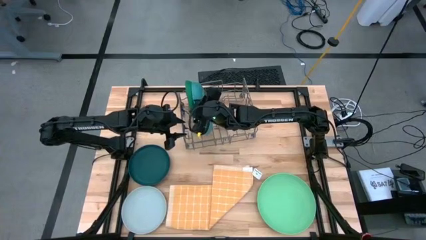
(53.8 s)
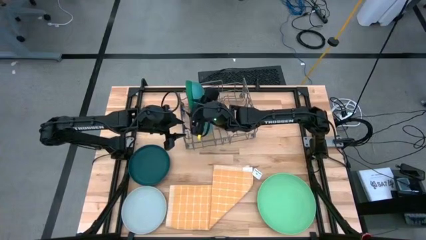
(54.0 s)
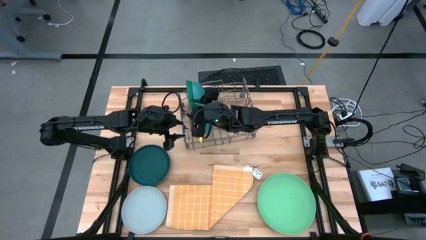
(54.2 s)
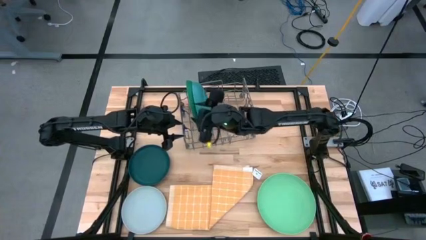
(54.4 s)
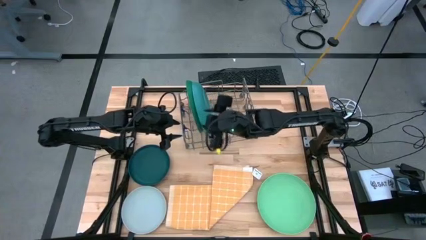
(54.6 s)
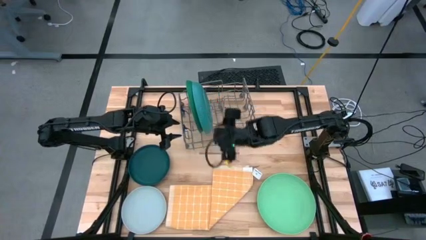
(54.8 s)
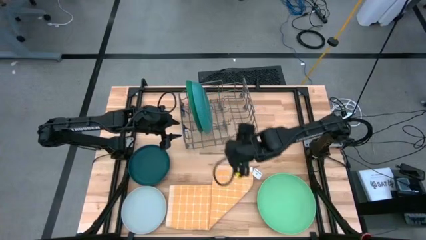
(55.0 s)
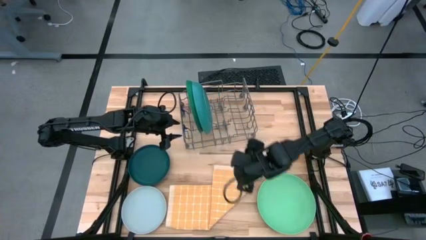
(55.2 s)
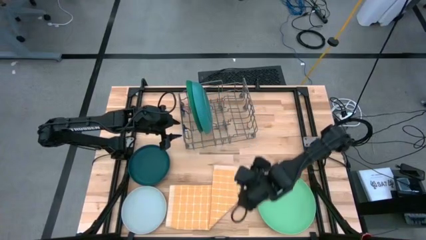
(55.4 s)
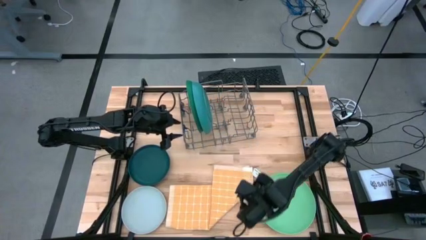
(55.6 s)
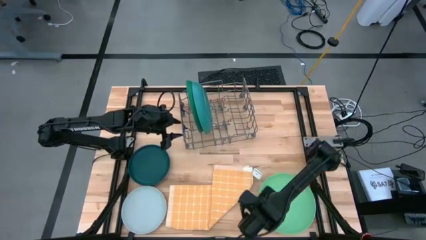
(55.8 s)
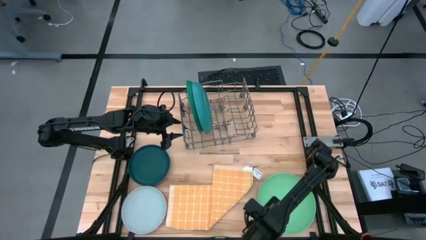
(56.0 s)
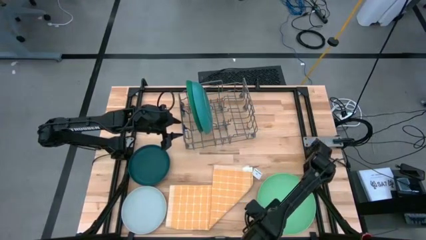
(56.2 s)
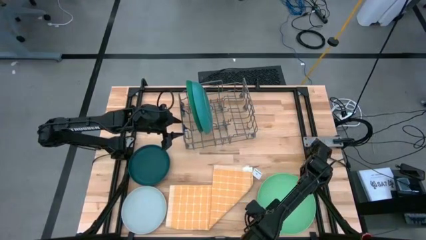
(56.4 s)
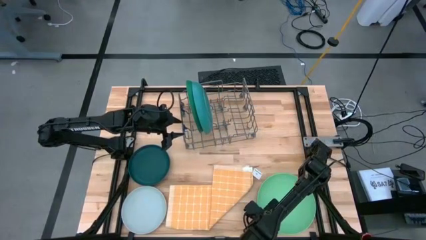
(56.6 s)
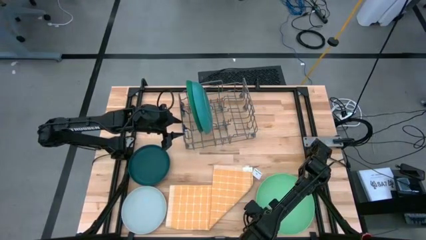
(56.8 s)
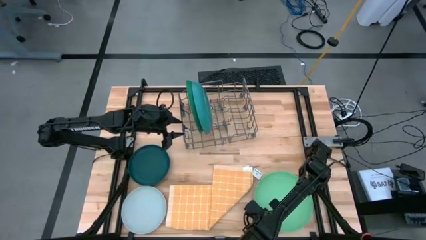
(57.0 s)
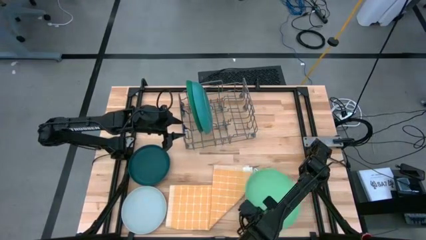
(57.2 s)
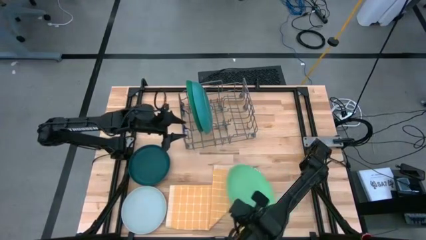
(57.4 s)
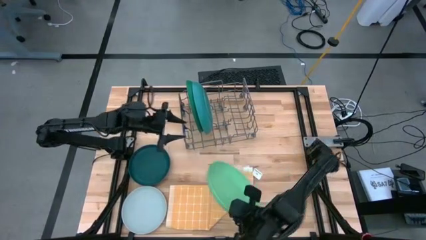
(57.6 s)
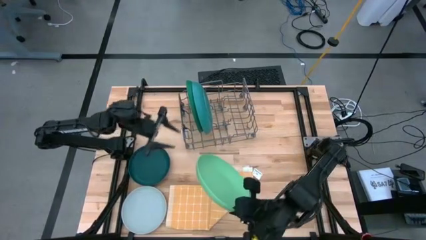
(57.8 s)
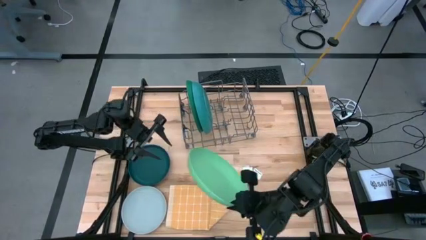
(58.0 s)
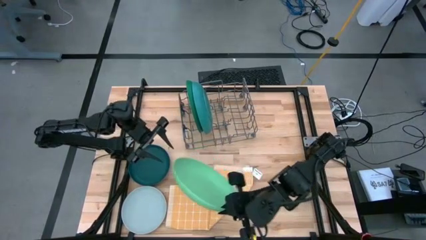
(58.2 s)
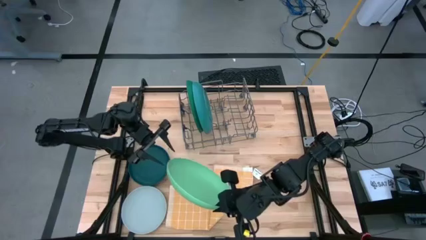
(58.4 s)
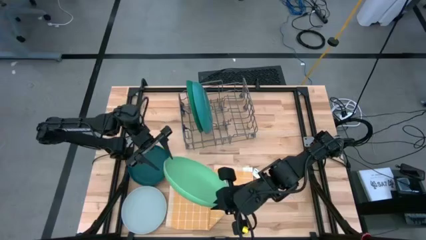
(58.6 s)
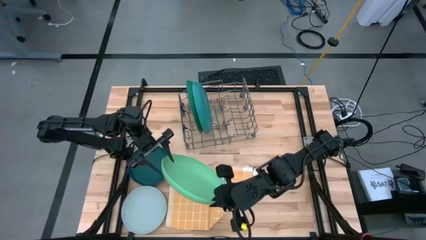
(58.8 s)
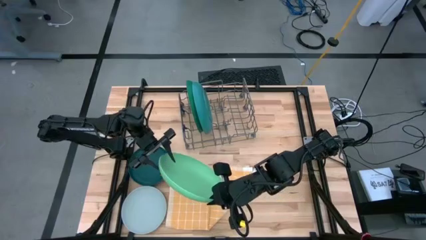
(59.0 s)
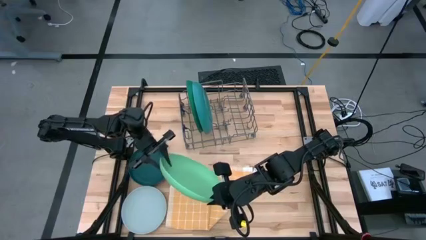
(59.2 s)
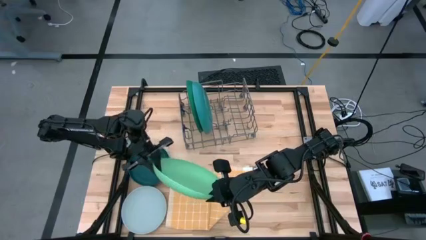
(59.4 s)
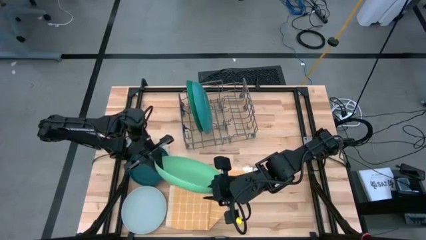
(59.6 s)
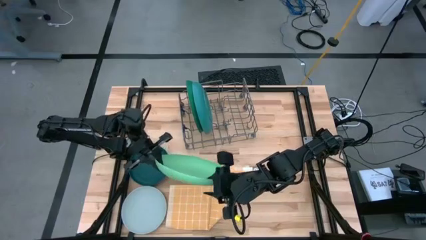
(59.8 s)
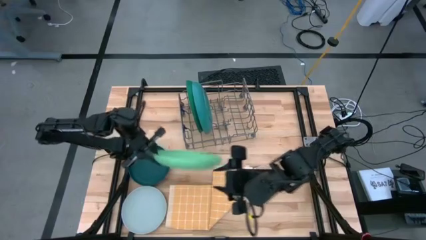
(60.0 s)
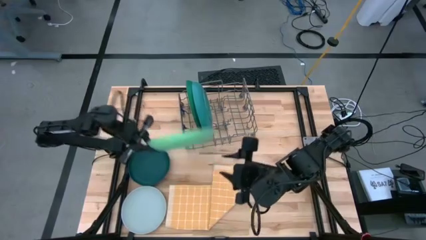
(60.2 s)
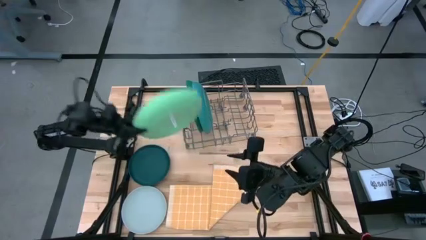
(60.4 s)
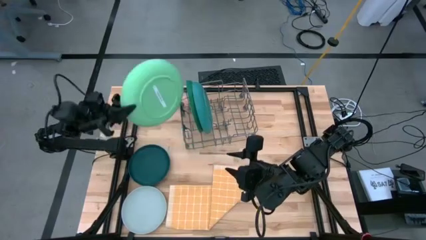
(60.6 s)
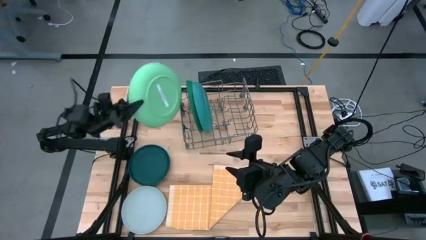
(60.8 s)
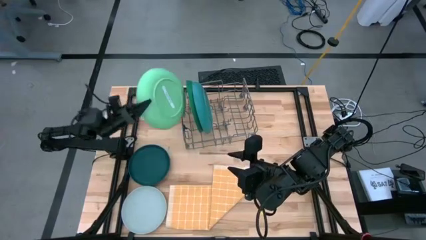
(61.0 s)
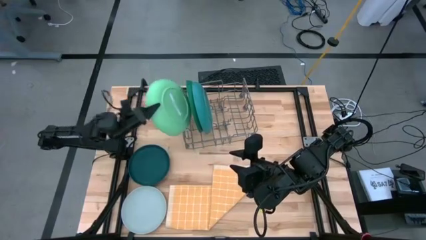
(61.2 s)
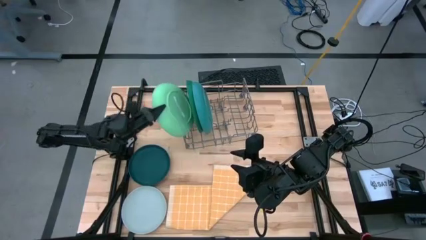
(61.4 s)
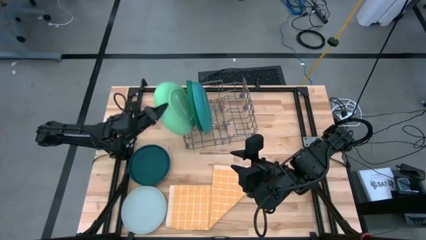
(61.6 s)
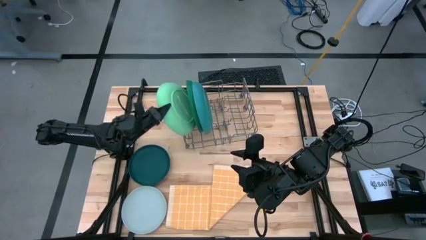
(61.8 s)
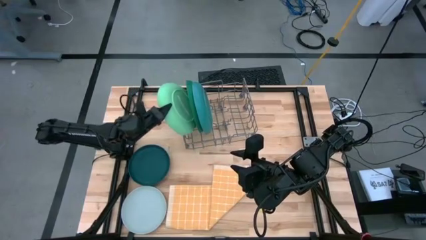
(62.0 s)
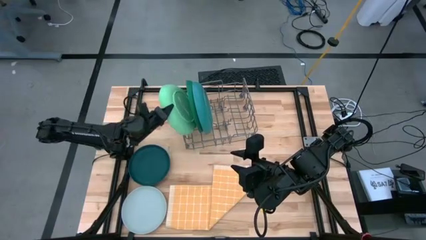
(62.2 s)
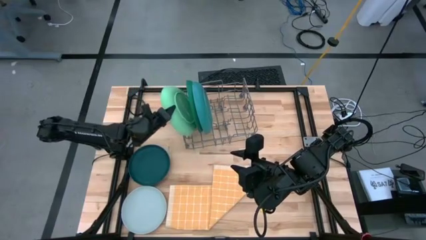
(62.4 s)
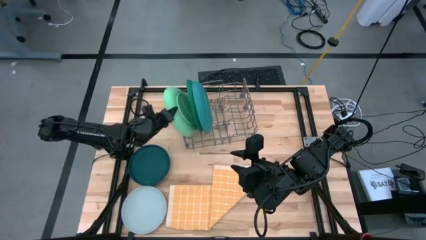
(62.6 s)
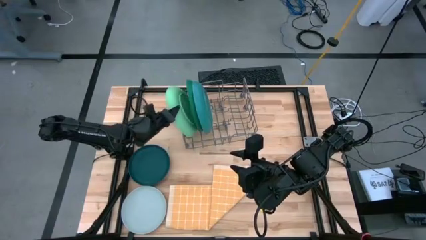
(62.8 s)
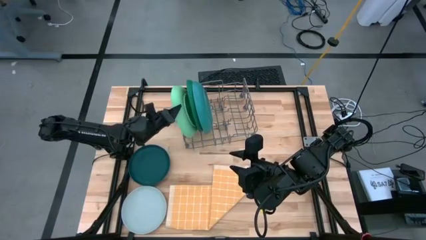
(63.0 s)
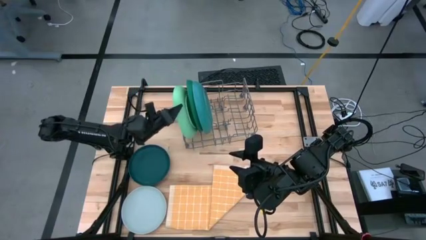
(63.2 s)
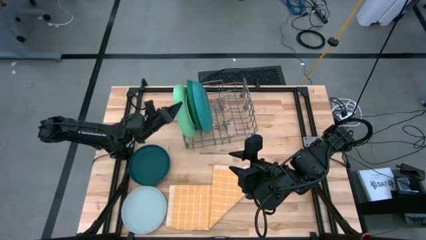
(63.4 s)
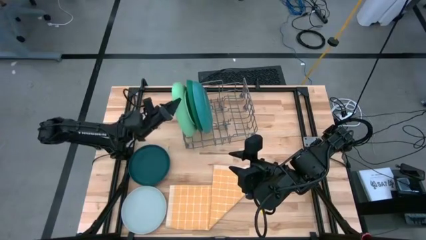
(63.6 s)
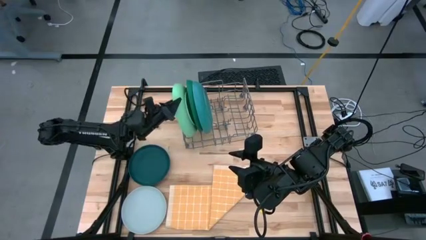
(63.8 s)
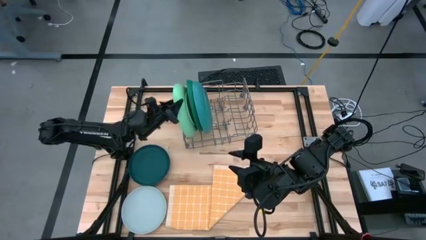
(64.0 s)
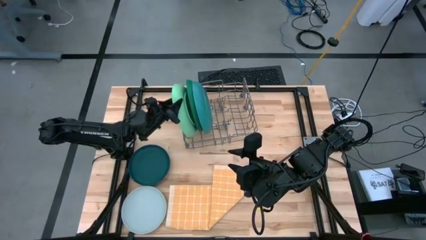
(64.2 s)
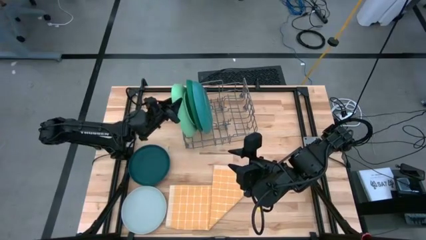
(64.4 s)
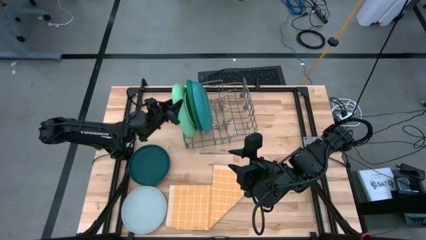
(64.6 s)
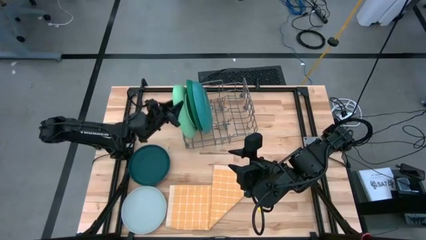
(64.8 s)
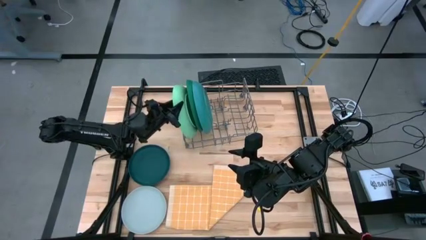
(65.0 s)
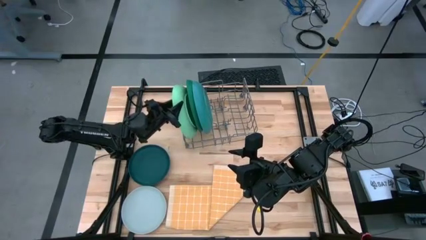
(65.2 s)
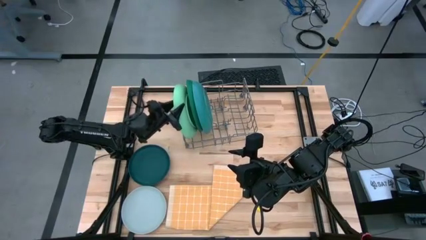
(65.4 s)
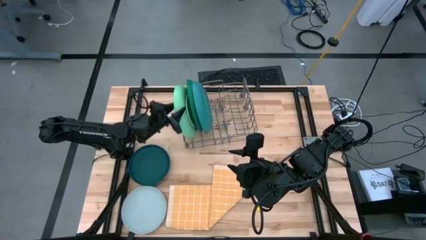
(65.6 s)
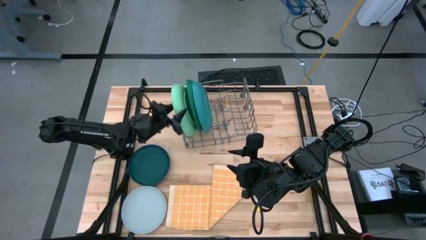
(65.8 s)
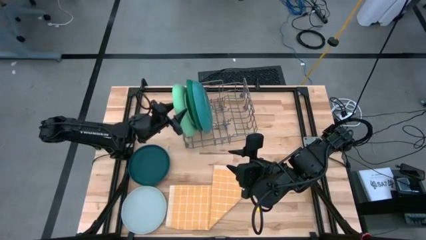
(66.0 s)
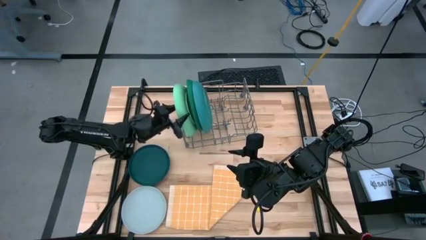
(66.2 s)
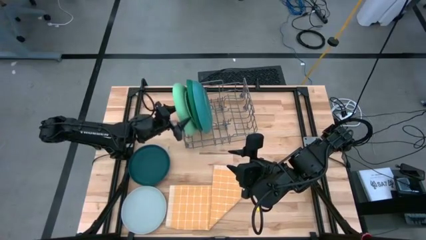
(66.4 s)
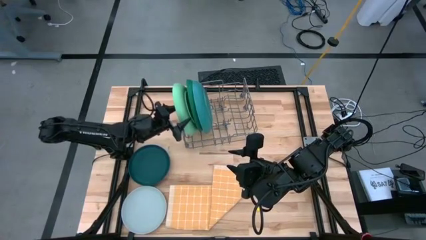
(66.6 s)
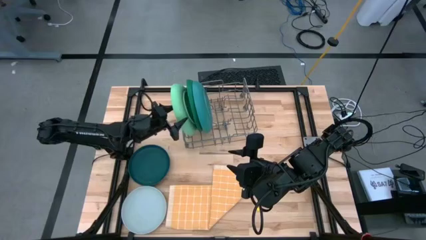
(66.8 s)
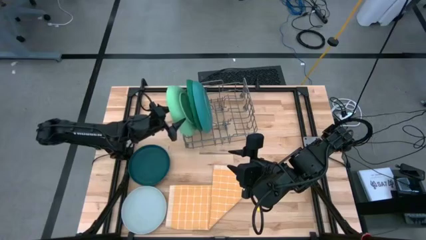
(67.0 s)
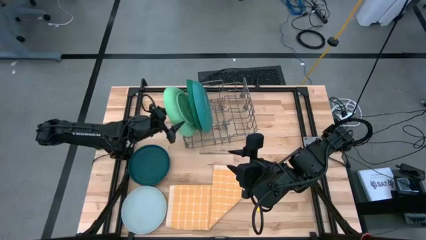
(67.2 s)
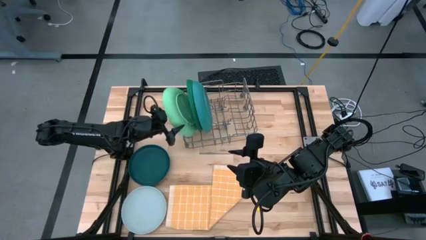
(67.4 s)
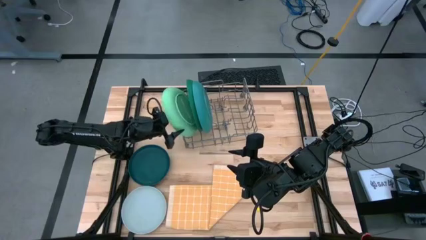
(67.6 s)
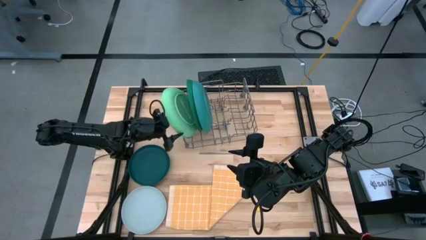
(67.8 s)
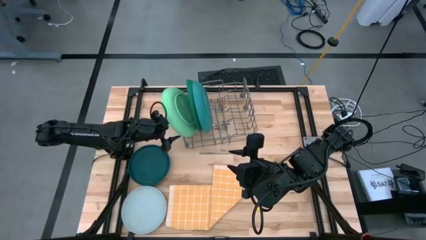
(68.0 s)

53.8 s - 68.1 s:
Task: Sort dishes
Put the light green plate on the dish rack

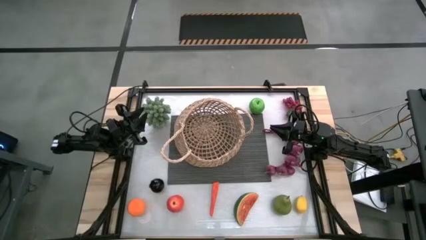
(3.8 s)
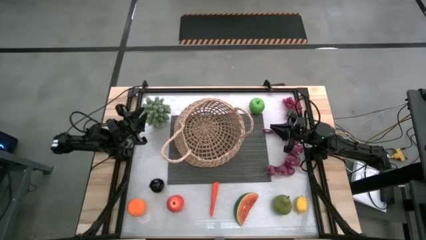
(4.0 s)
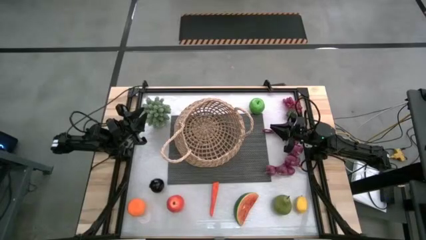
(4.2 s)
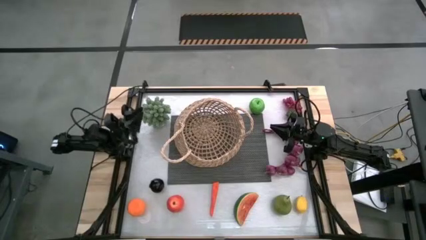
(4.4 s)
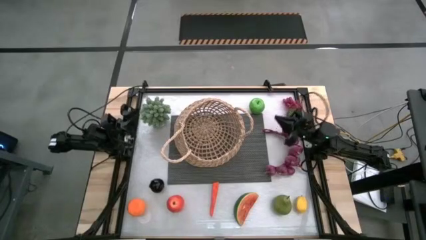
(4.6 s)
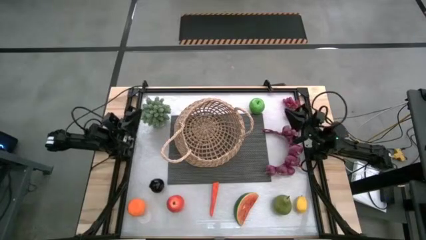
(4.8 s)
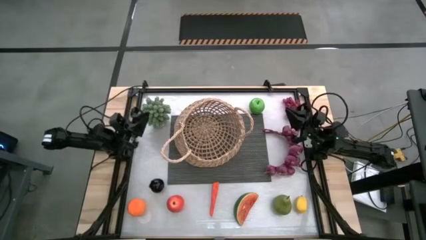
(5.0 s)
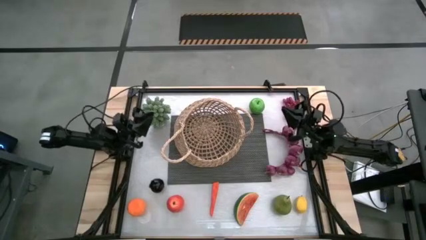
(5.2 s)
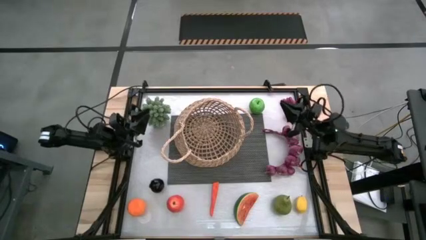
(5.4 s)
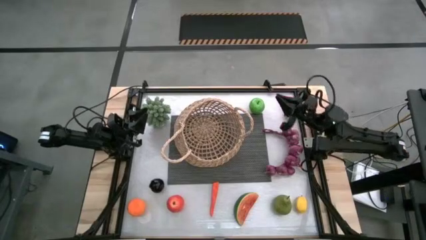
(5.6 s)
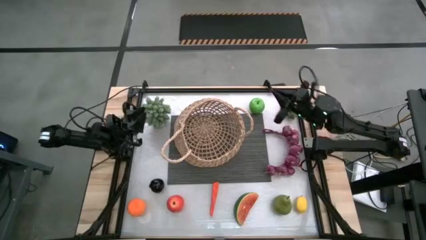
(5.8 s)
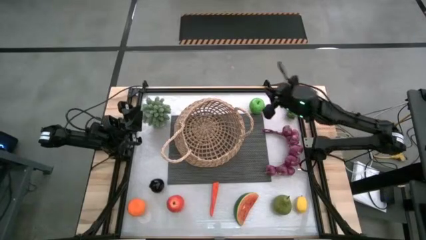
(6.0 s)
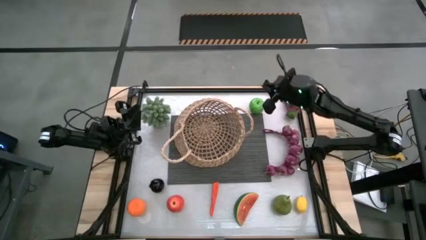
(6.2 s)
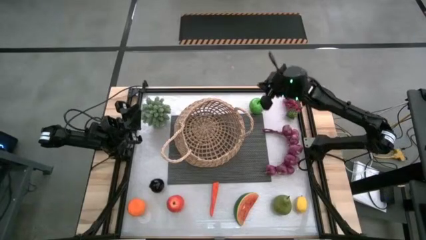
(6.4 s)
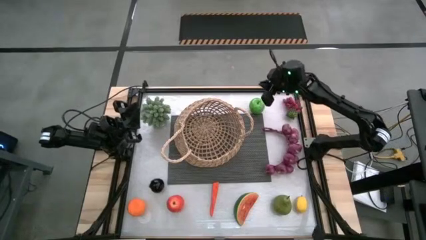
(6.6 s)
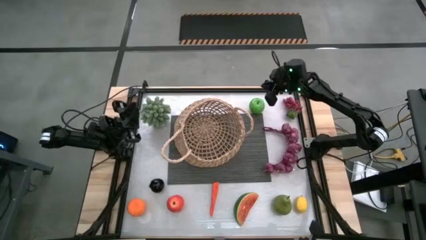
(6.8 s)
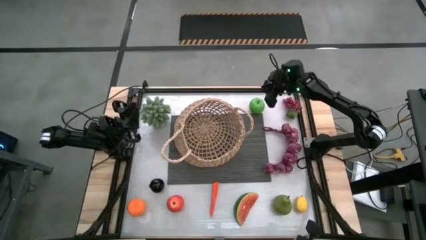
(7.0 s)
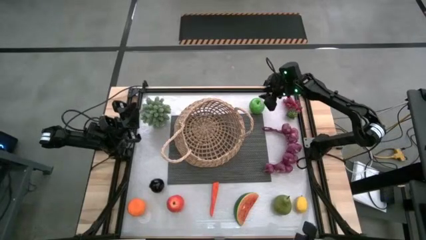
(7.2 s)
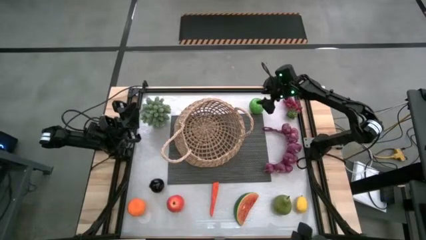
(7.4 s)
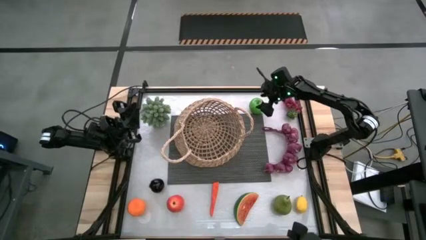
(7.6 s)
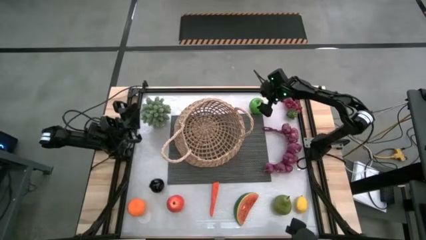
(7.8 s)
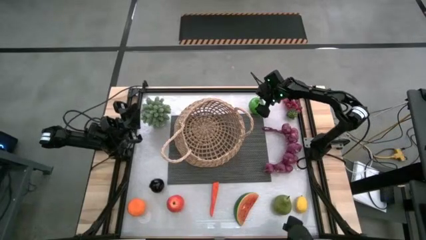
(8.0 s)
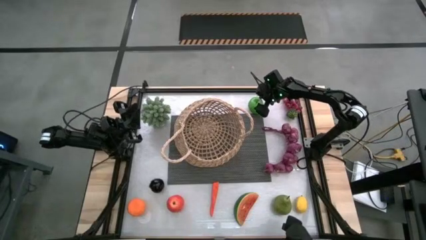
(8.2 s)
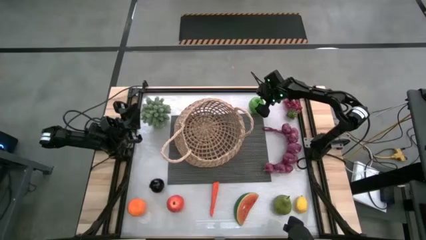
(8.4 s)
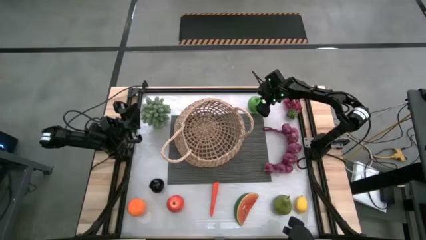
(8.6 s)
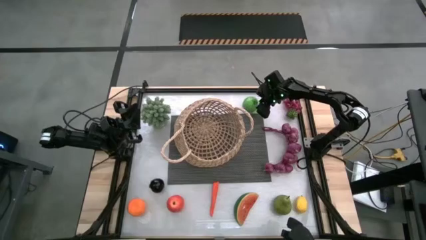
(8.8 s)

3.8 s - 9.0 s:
Task: Build produce basket
Put the green apple into the brown basket
